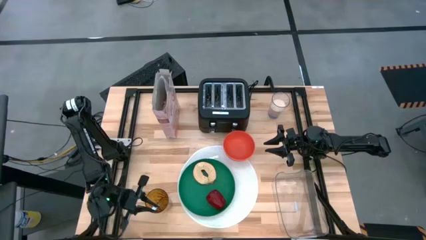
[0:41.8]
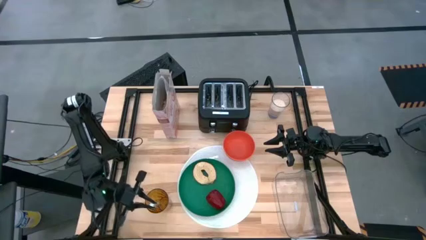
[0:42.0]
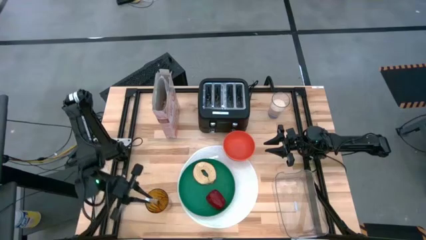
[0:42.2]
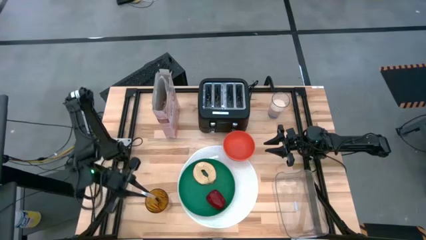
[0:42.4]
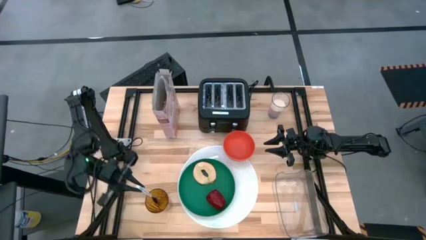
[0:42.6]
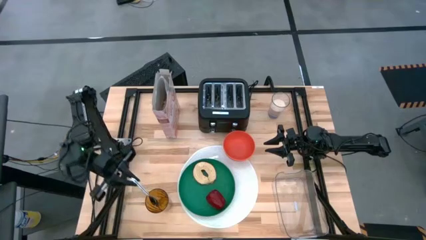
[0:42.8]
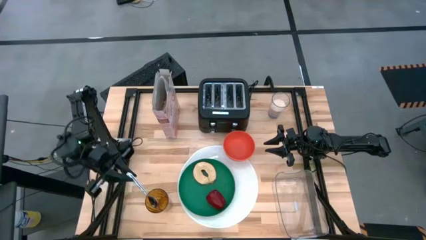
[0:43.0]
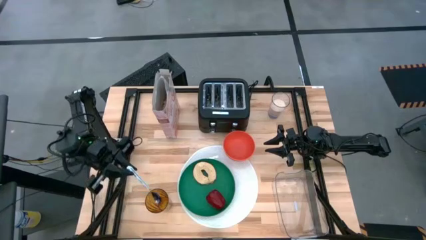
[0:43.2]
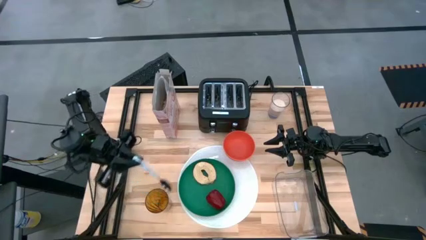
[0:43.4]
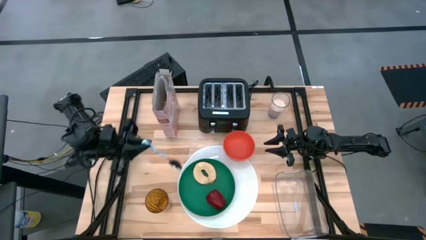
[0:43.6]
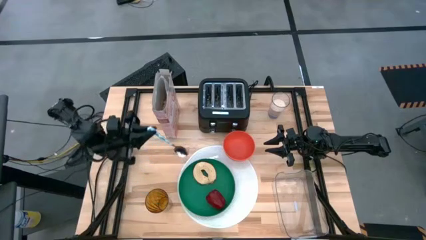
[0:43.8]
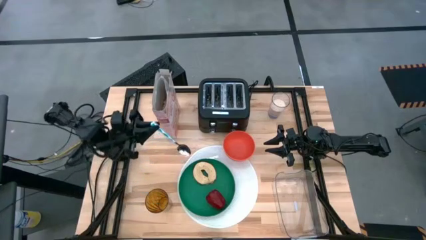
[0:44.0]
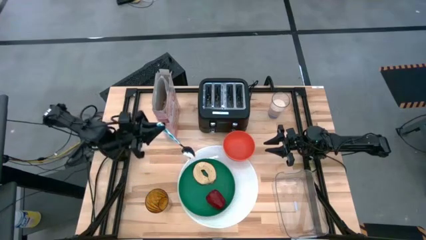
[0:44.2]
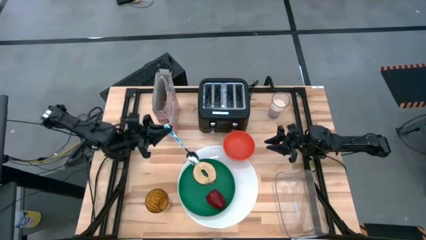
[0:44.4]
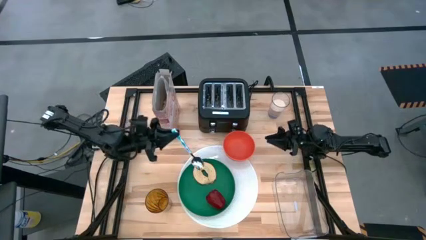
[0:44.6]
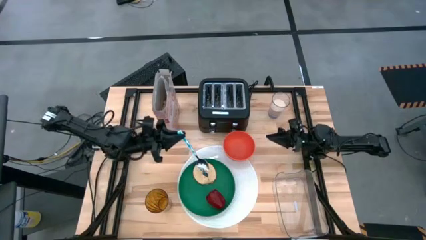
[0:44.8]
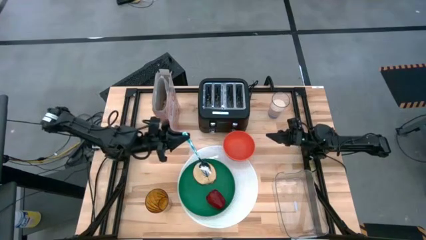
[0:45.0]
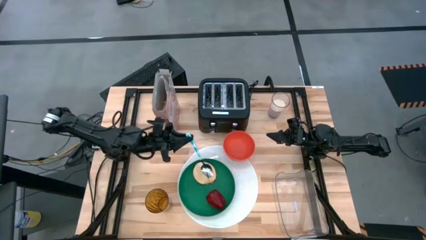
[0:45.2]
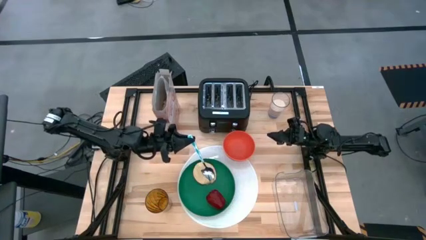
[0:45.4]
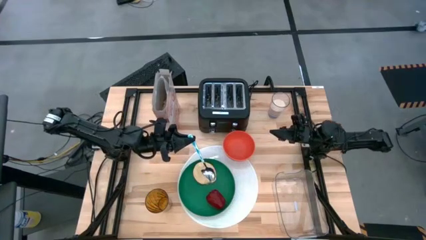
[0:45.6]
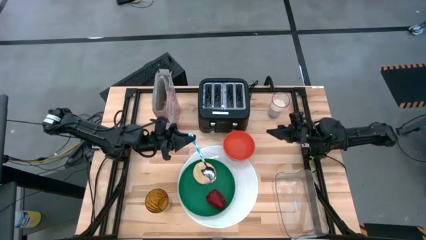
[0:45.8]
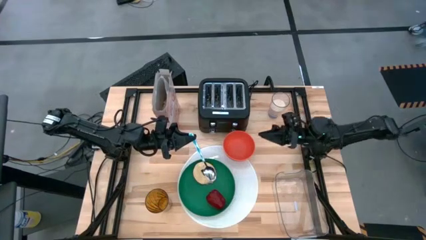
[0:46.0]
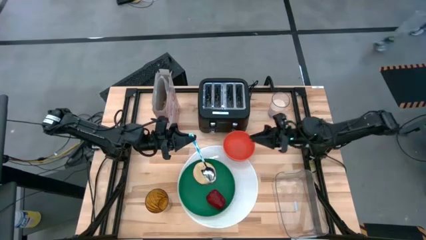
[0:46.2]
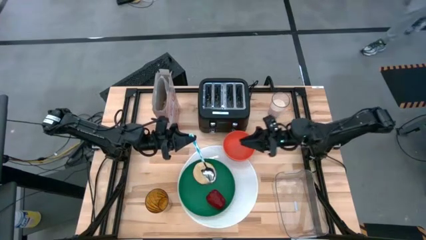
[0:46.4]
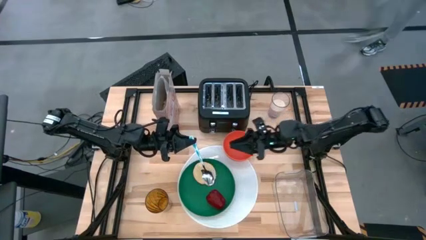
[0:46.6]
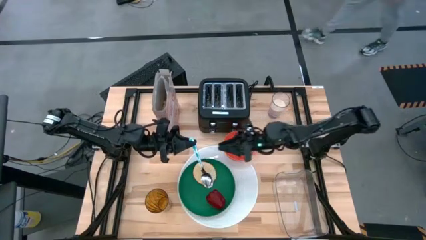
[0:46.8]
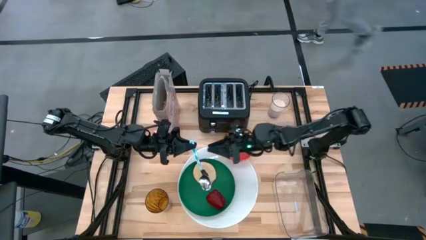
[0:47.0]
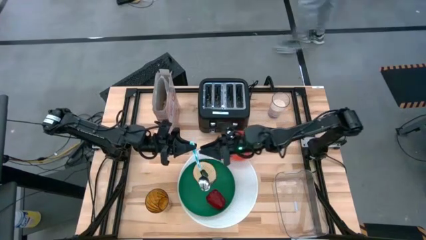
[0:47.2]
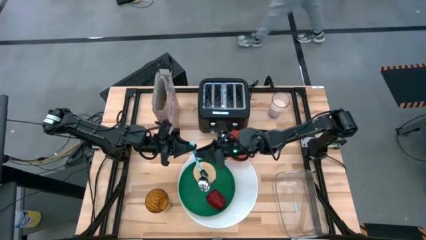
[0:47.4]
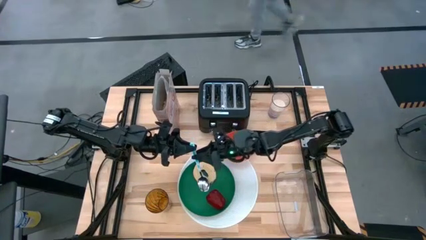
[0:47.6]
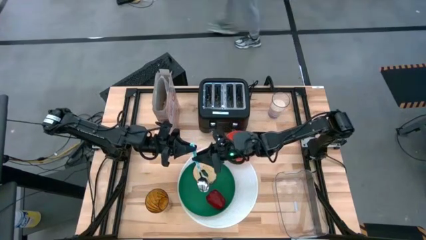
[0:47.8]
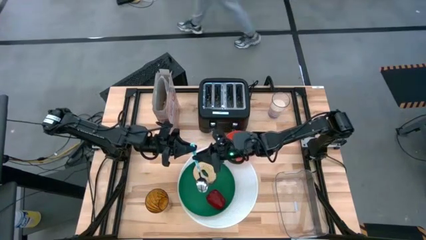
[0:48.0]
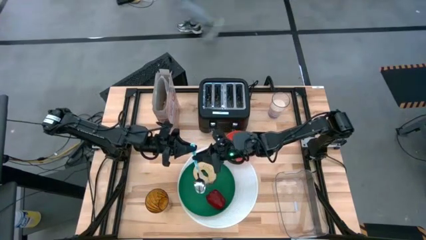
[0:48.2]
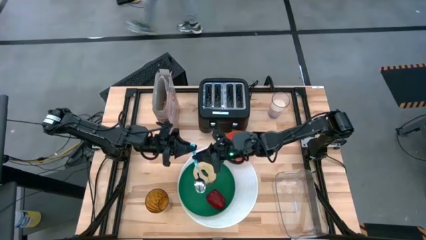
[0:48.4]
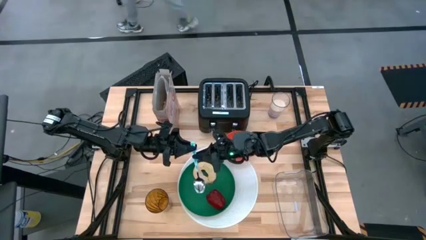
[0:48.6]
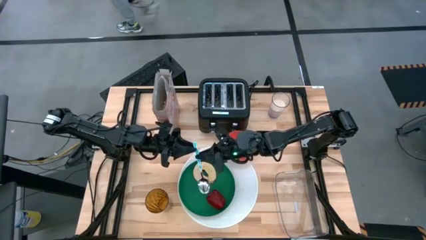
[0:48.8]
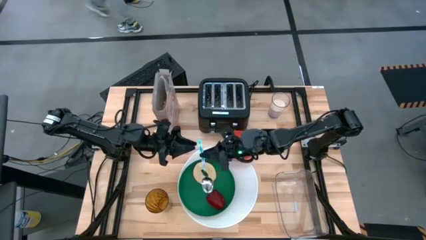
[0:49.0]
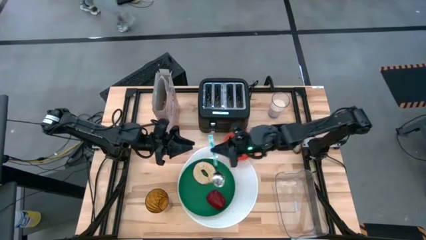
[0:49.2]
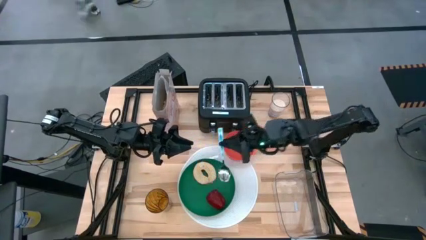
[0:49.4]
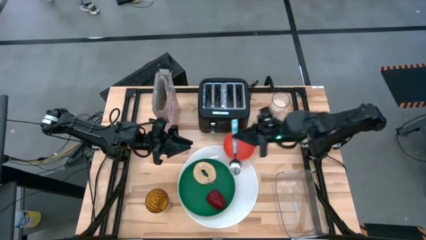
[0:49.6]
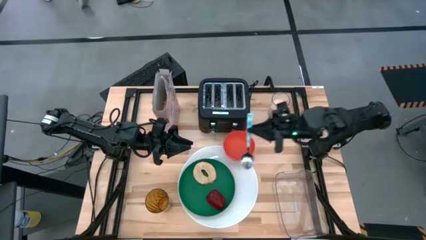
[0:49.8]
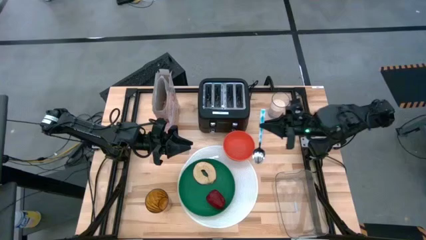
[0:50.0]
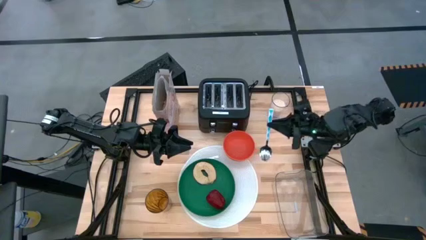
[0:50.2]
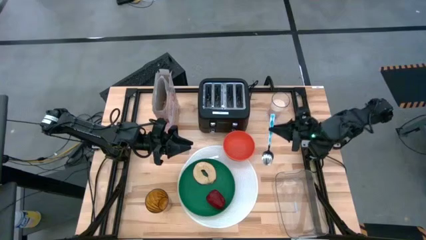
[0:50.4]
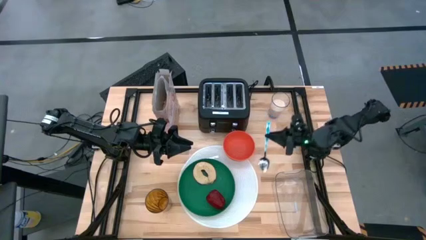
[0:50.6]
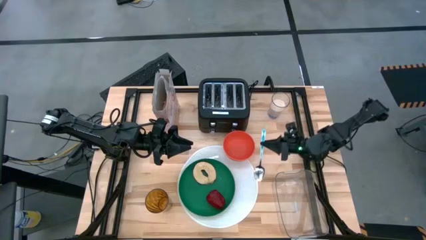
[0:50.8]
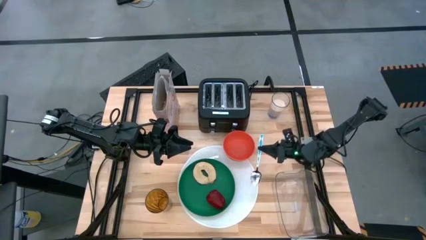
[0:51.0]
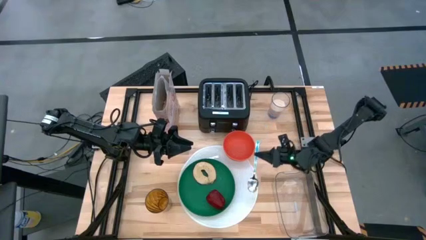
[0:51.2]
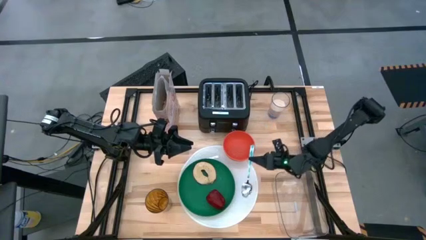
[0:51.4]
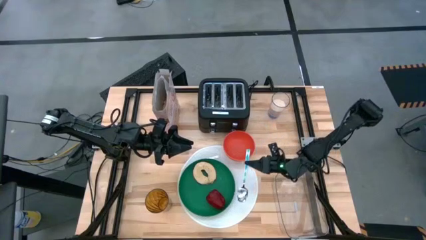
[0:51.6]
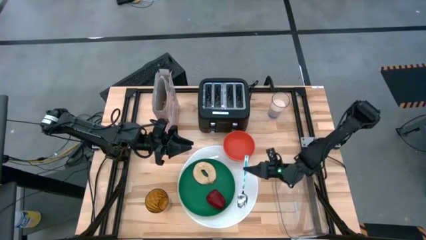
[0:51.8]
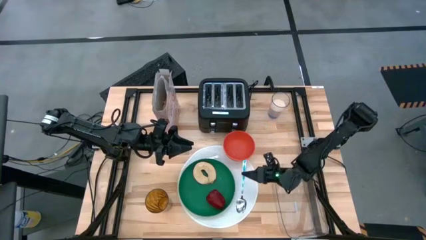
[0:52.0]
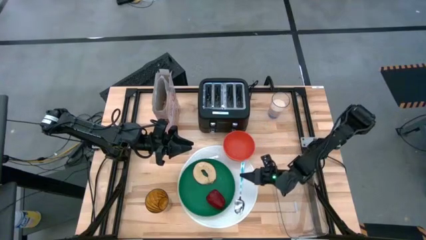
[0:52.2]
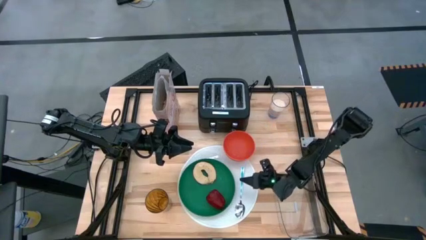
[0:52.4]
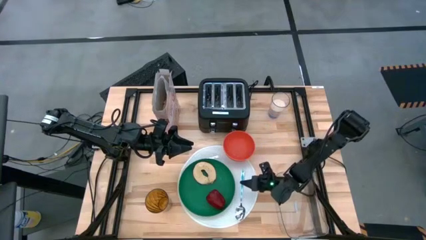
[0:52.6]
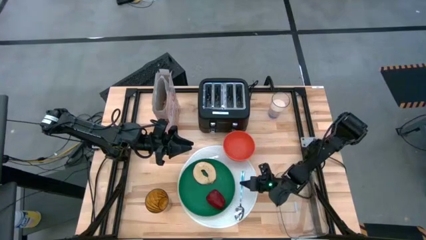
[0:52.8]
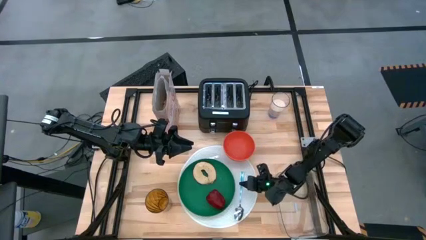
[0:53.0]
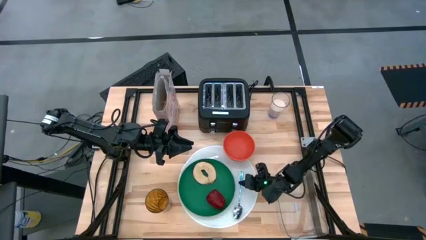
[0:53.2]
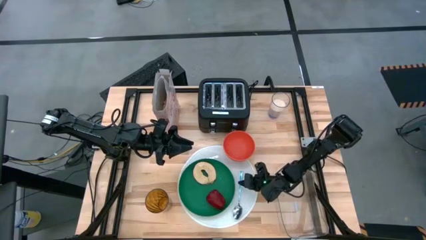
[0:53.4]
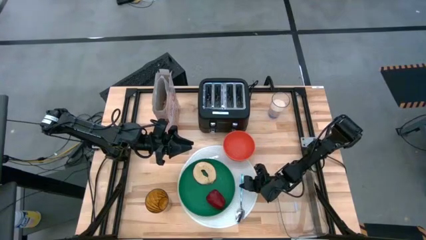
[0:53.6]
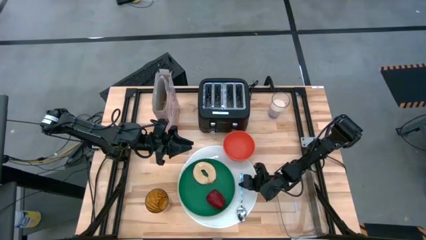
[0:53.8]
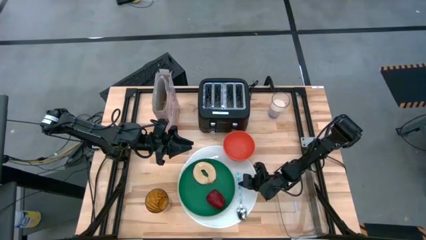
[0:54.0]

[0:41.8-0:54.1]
Task: Arrange a breakfast setting
Put the blue spoon on the white mat from the orange cup

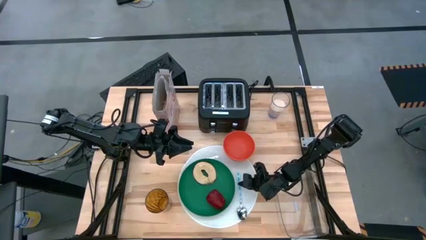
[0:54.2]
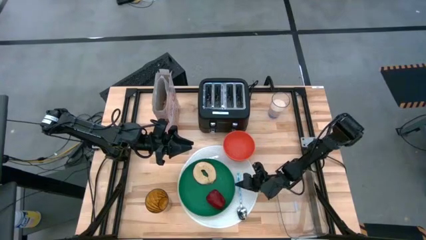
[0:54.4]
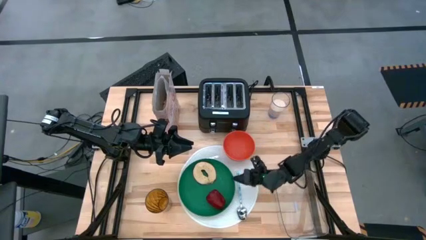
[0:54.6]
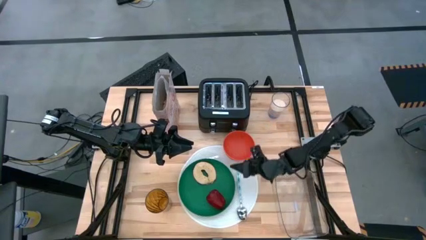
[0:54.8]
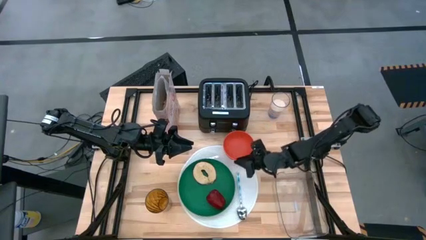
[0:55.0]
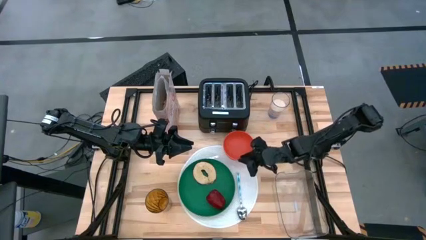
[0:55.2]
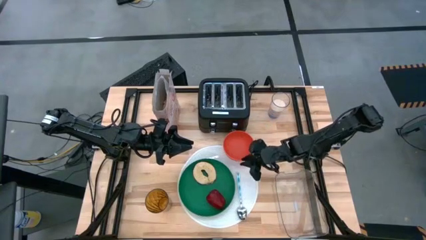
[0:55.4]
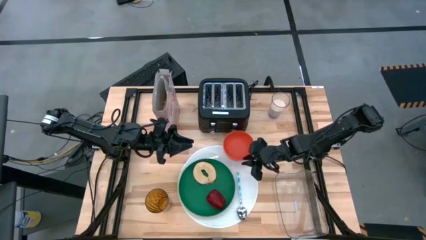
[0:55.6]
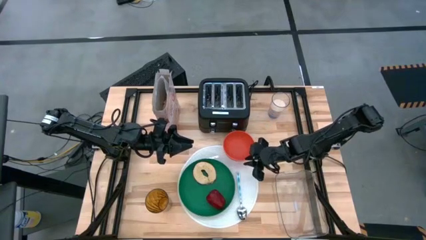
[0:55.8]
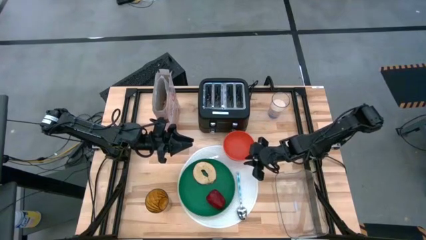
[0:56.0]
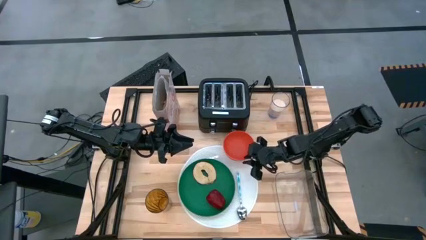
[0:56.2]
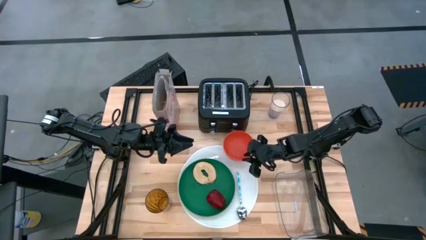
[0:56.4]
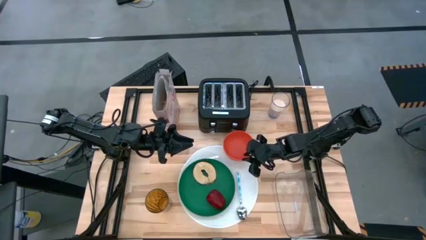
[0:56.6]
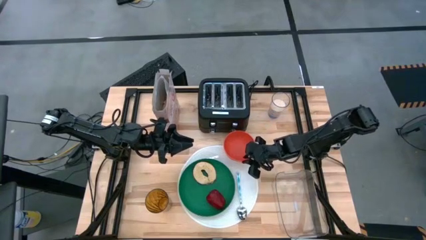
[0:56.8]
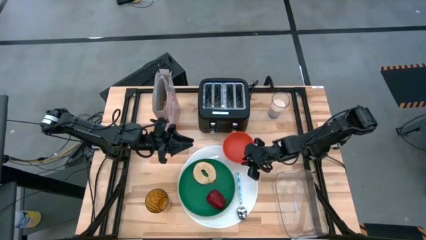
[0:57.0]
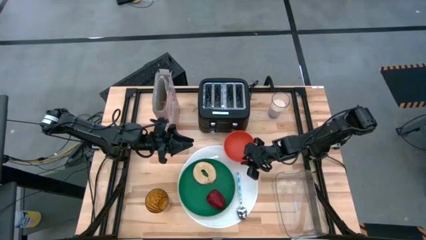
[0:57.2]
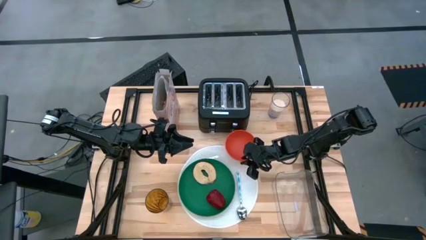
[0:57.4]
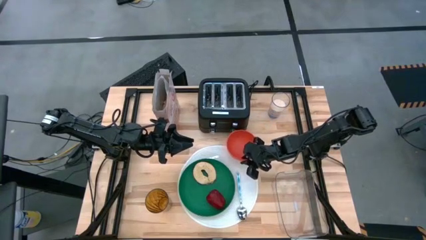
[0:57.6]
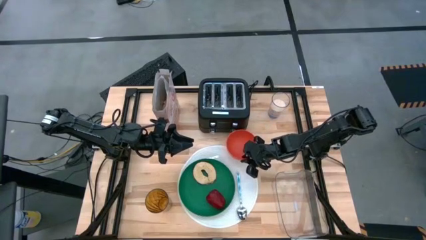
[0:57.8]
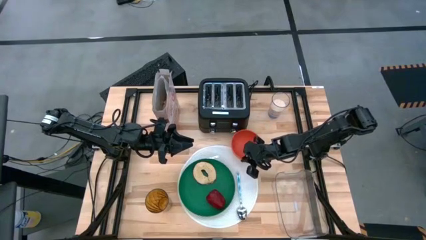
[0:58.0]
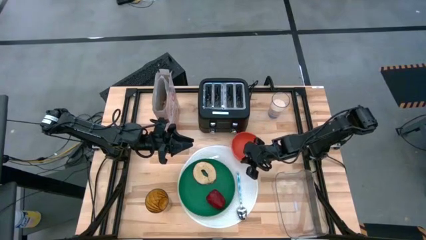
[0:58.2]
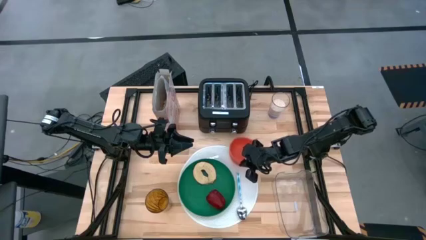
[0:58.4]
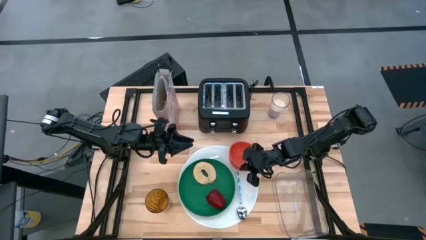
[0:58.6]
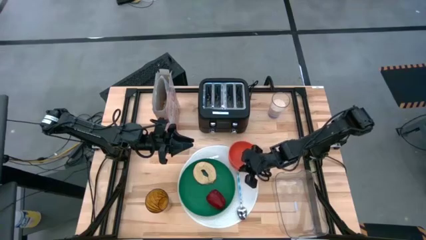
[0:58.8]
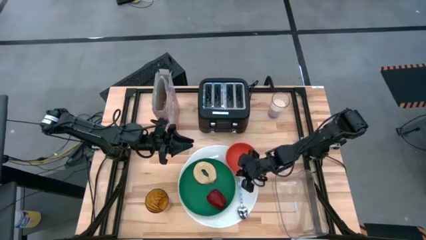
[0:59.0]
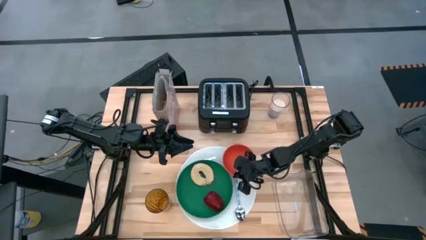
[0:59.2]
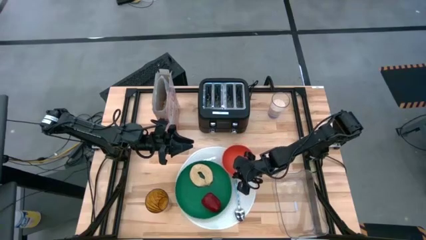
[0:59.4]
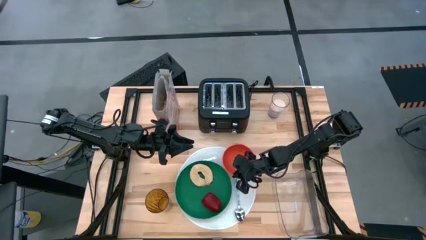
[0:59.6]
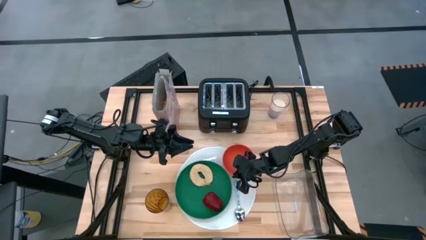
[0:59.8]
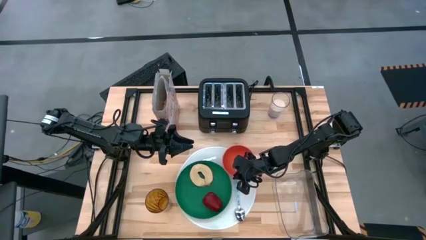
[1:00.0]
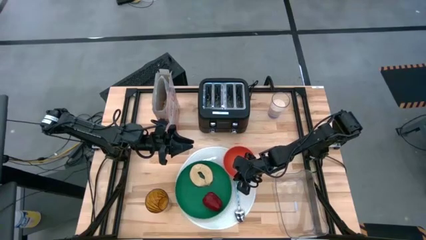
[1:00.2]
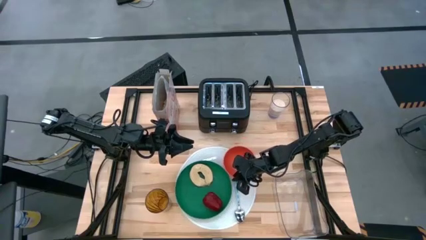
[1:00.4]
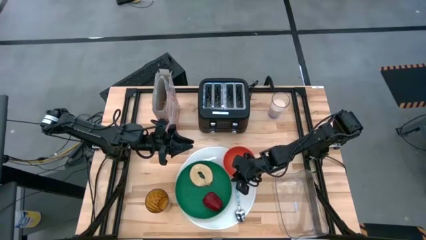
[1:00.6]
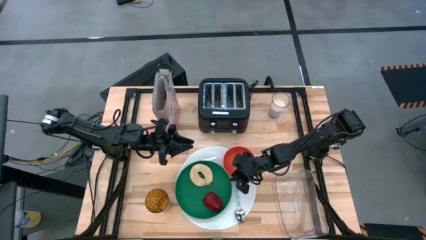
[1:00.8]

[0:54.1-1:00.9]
Adjust the orange bowl
